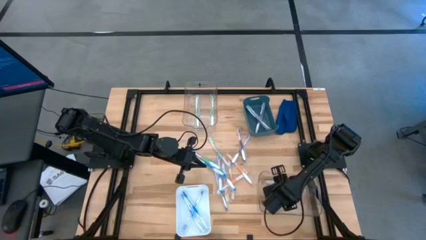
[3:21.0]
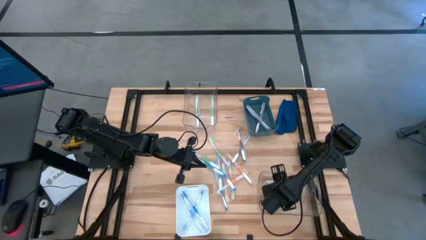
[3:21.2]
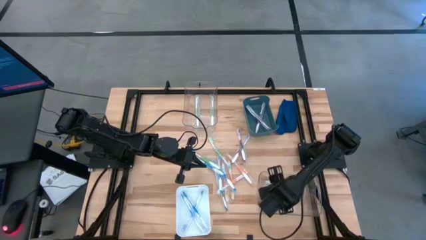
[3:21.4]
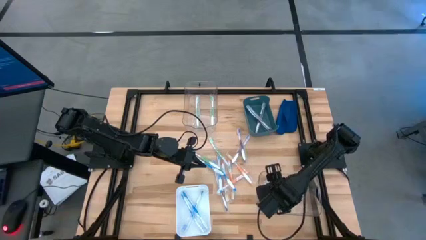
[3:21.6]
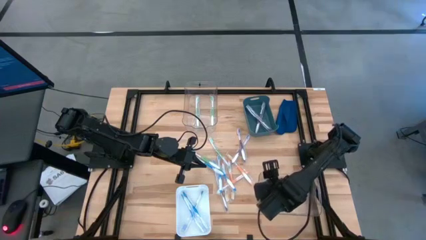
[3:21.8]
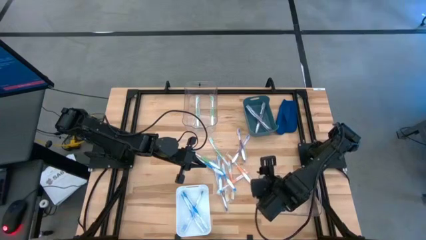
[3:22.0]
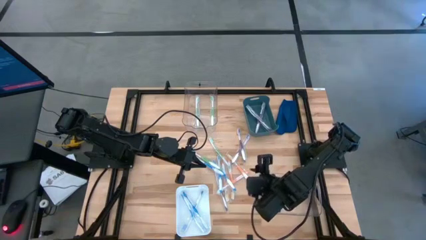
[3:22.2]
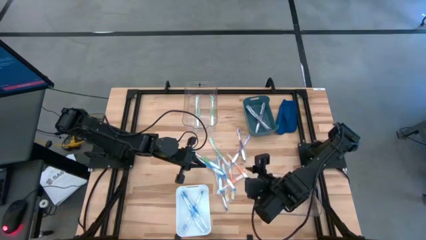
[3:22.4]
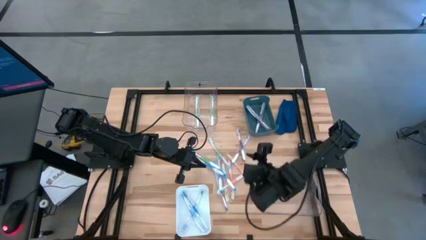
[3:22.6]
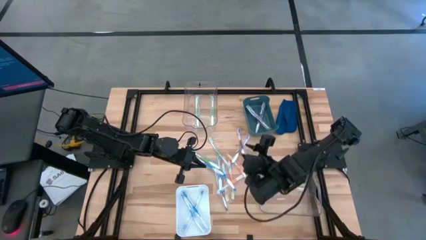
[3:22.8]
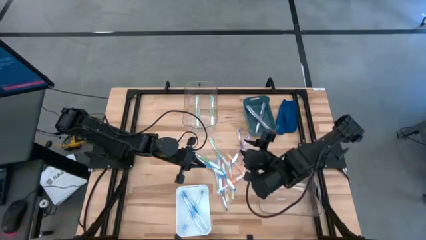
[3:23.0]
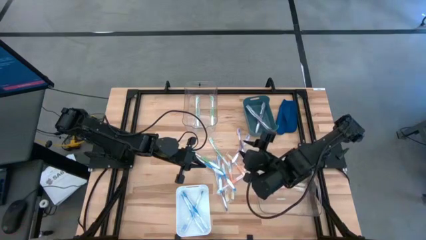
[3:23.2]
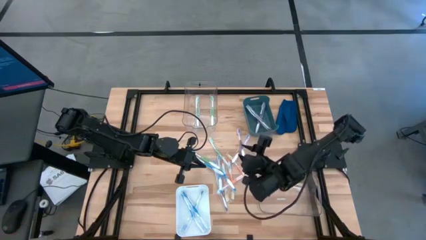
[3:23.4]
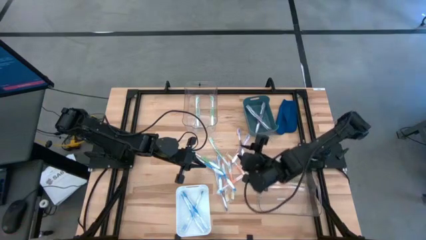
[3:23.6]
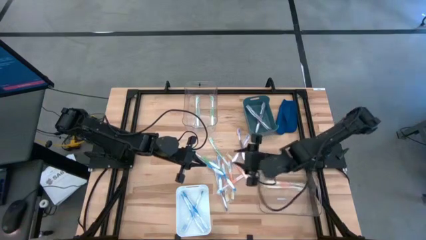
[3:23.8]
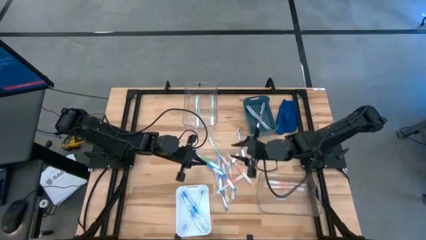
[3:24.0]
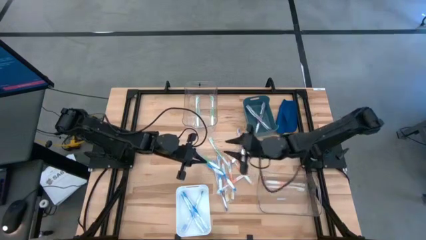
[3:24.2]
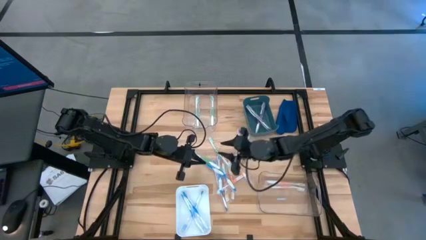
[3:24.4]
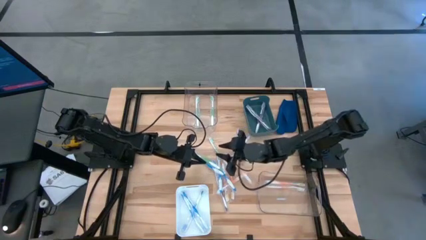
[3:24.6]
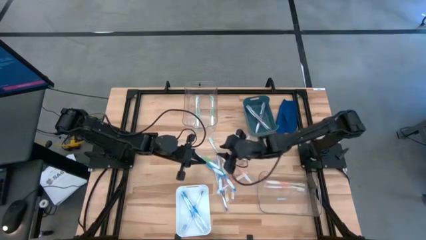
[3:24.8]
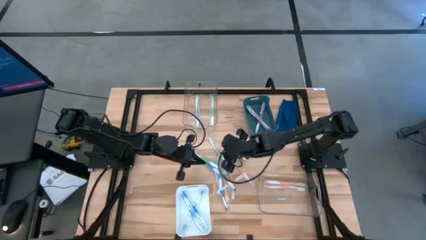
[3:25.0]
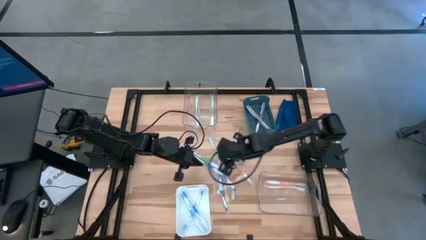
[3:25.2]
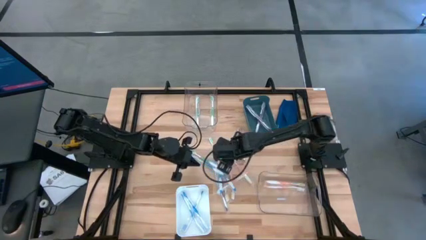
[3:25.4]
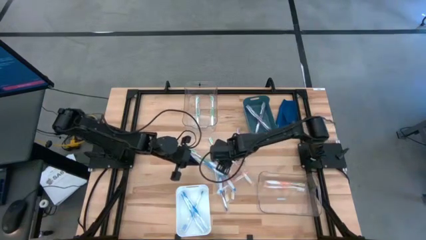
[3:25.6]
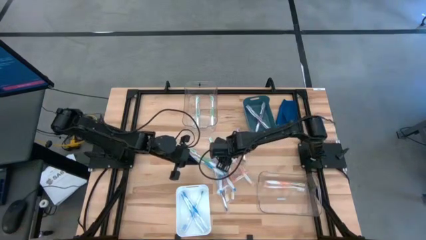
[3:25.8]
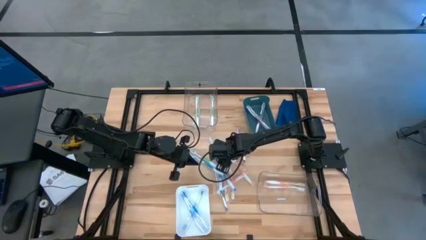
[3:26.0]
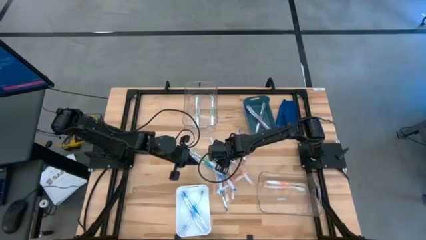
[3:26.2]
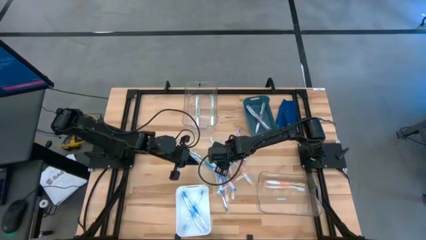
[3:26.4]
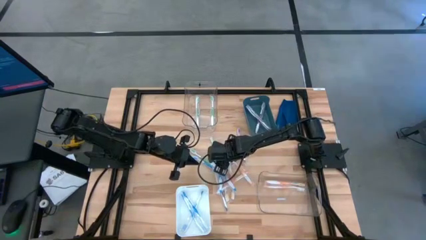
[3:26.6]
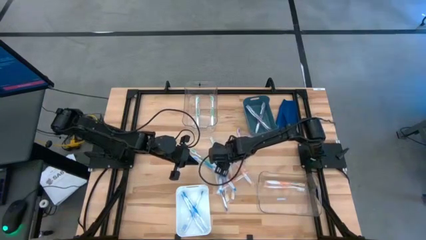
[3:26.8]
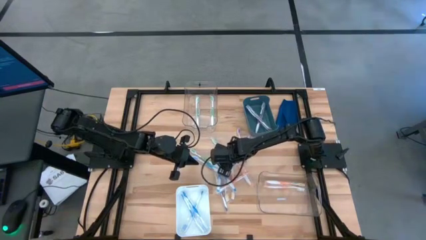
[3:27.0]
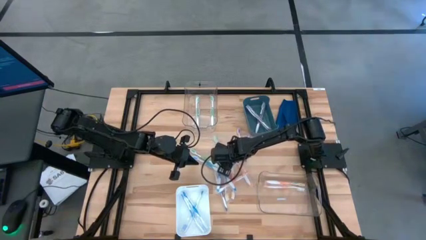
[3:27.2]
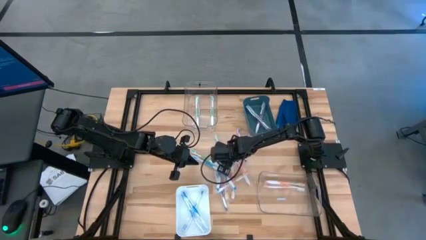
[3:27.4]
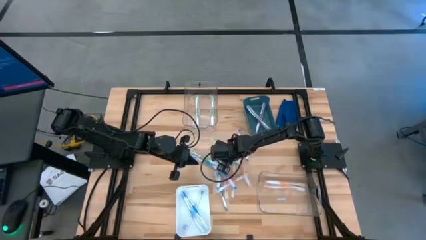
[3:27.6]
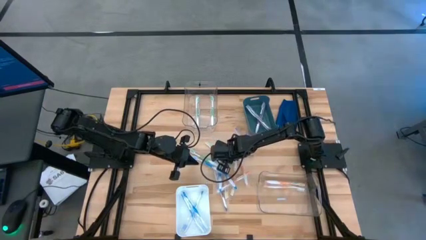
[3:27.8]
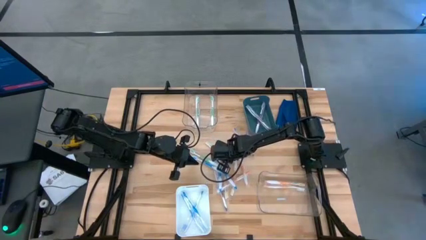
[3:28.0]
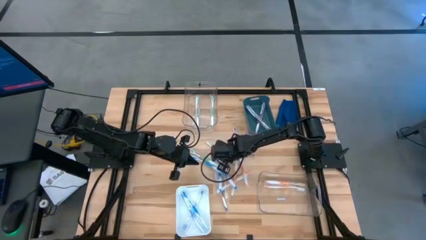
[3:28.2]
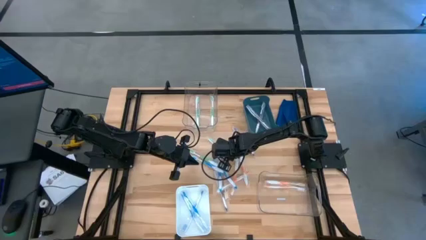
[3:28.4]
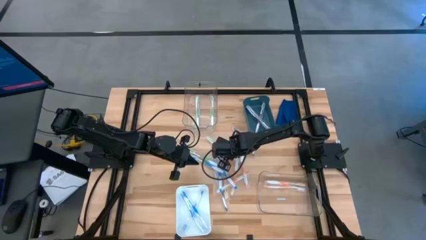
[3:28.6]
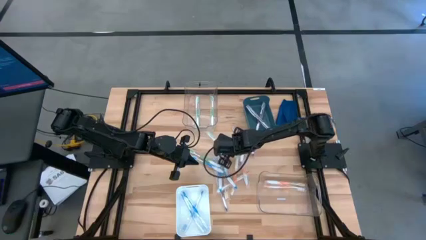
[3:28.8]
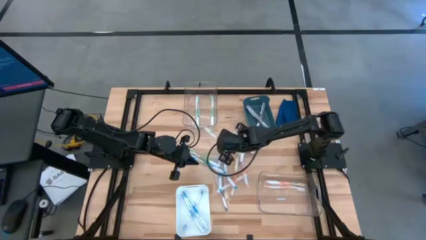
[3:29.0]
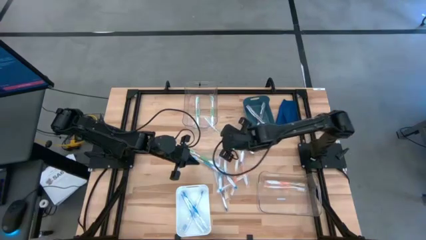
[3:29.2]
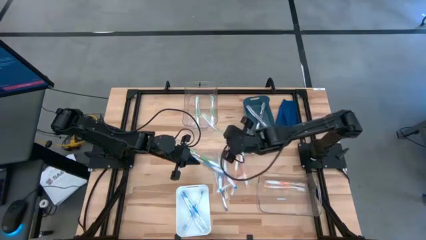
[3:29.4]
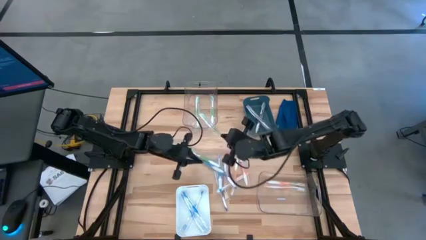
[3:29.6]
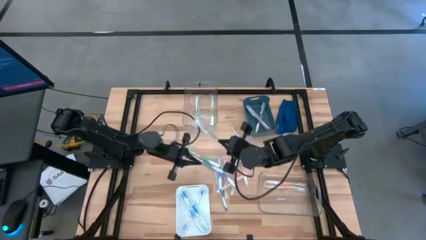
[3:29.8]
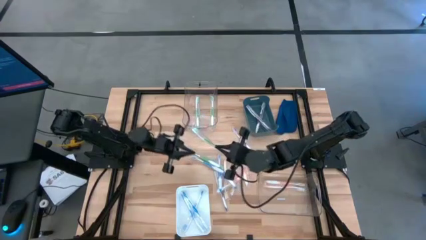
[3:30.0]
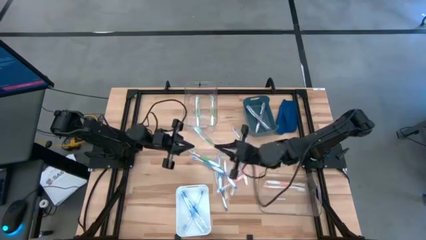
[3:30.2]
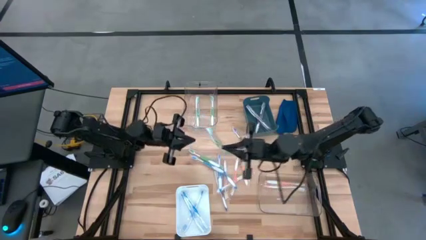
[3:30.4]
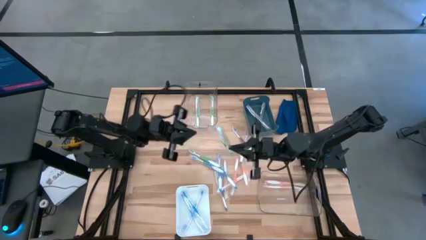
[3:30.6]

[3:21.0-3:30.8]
Task: Pick & Place Toothbrushes
Put the green toothbrush into the top transparent bin

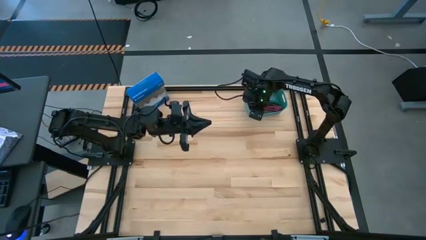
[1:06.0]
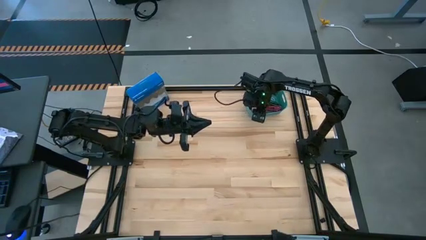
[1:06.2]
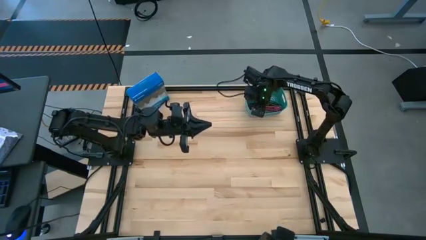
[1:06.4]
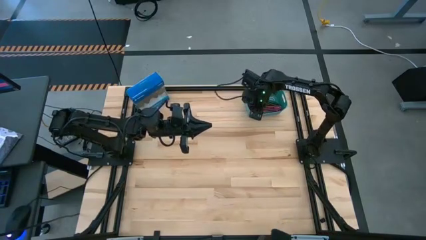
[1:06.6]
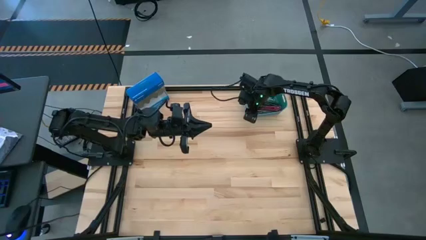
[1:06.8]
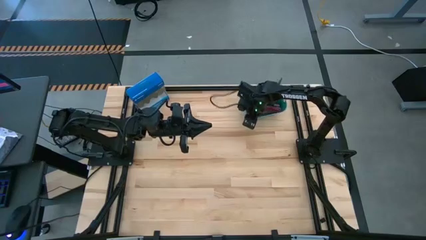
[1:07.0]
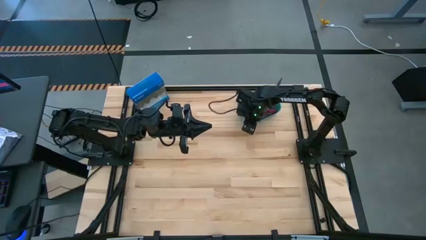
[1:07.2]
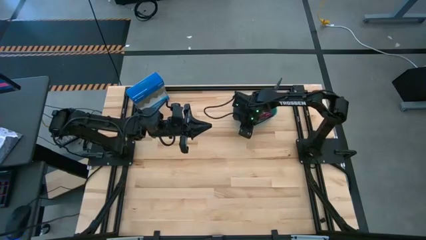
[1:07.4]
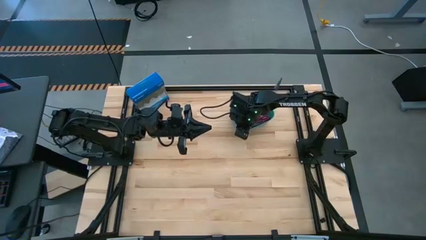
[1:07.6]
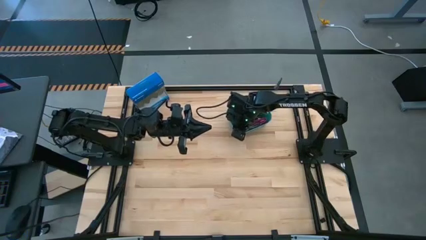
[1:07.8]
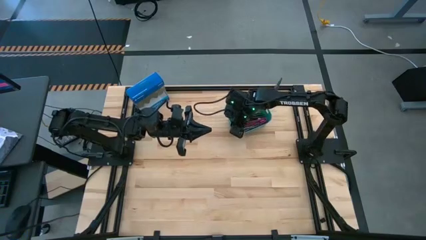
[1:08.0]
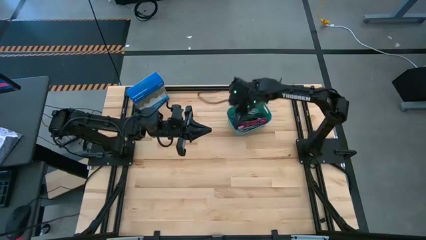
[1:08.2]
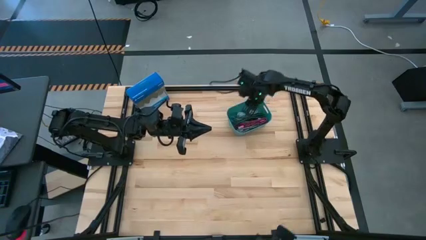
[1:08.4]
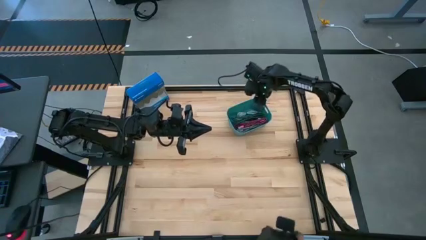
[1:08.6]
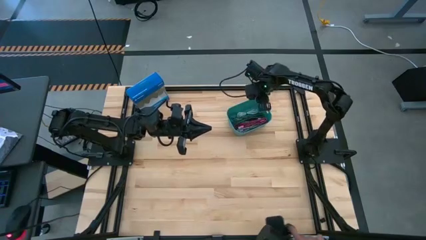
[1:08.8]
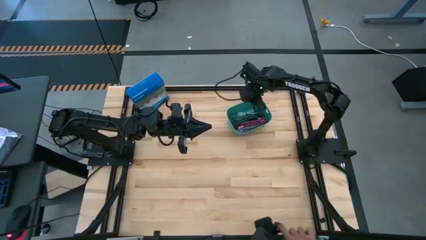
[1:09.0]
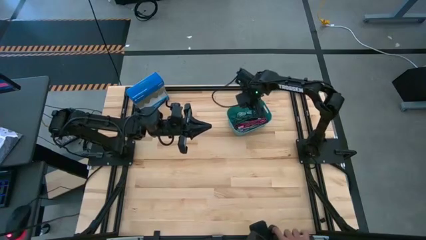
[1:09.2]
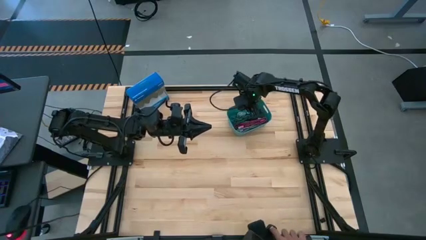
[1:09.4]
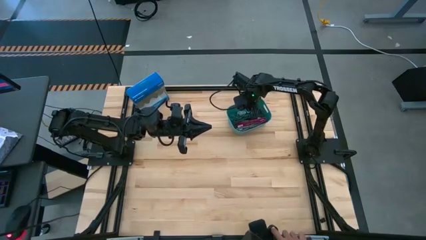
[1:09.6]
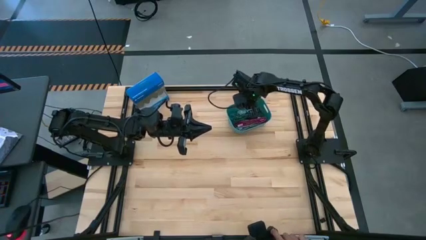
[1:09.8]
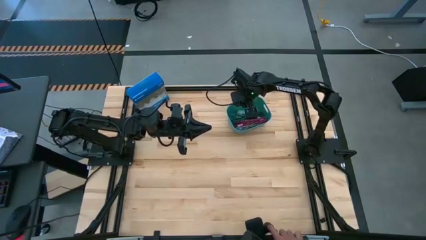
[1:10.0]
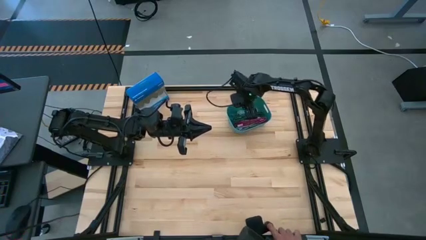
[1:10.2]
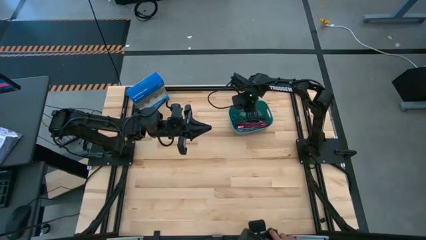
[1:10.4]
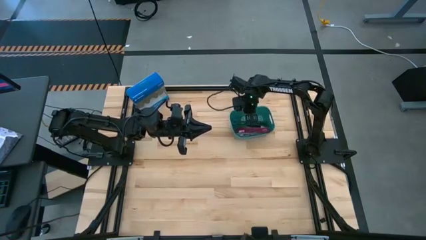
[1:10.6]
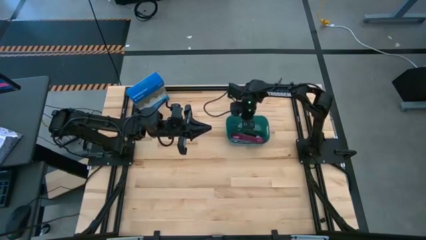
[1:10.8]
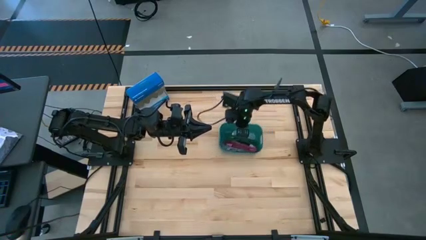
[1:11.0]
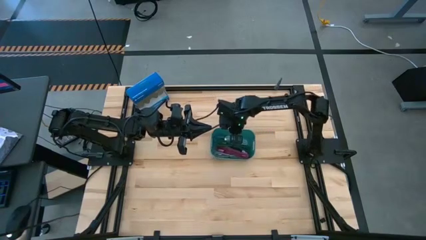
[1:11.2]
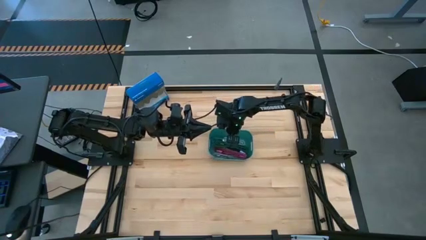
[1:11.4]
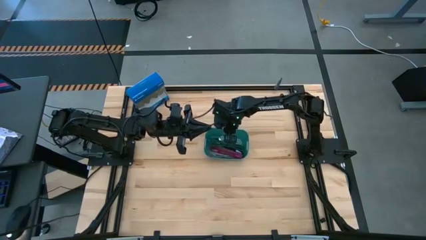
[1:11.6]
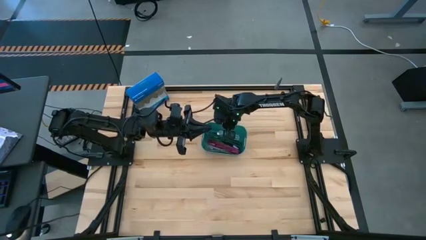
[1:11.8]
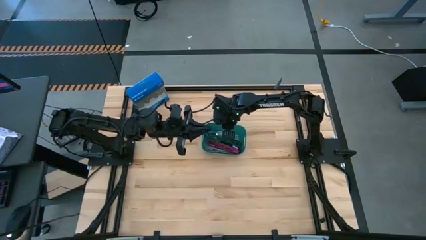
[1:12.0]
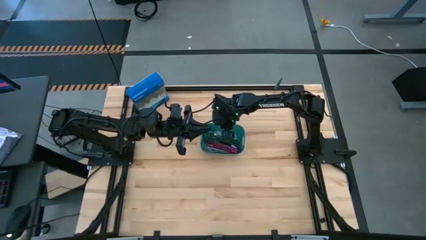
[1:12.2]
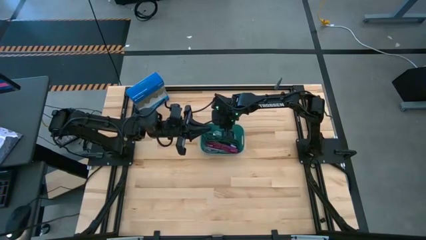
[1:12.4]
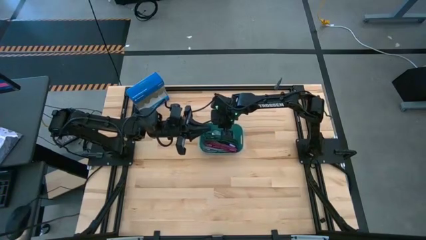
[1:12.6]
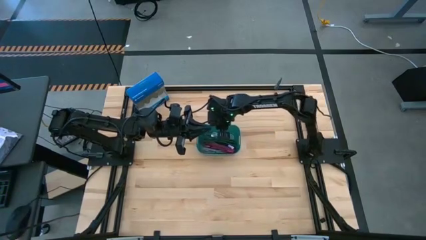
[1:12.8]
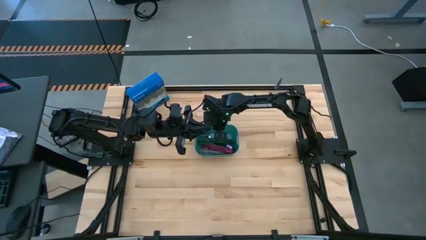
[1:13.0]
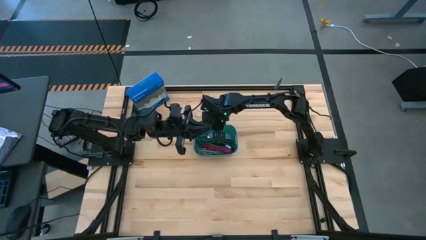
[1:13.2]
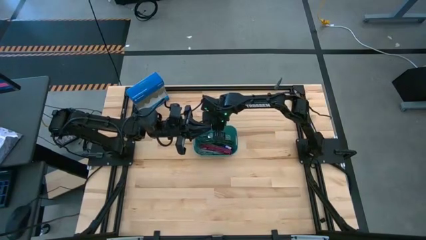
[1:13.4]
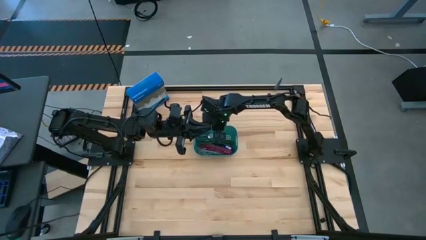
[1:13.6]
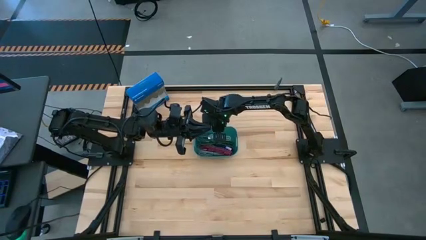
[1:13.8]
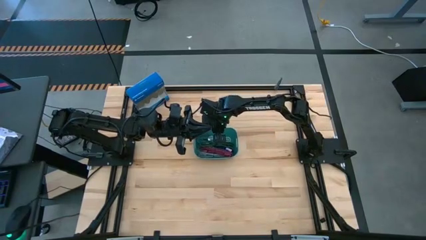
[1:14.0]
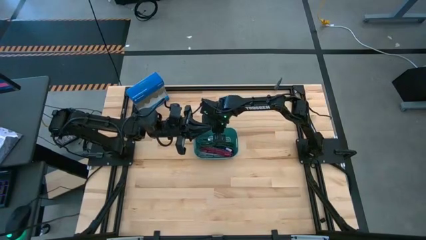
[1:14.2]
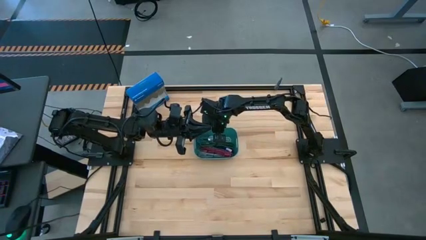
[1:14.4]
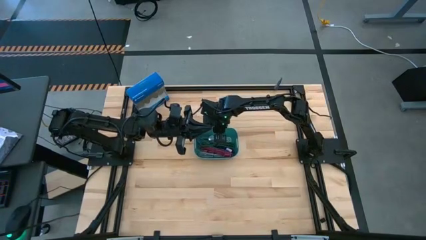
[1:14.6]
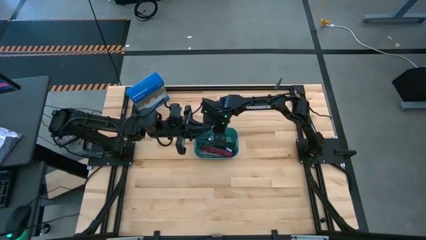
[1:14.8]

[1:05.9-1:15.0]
Task: Pick and place USB-C Cables
Move the green bin to the center of the table
